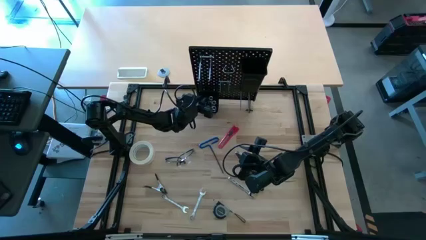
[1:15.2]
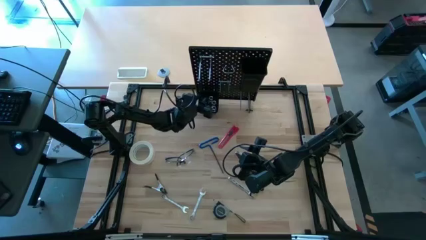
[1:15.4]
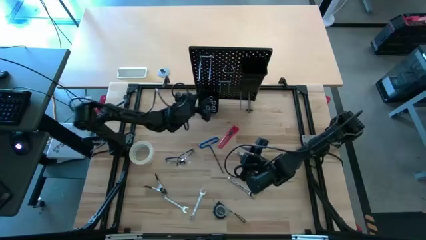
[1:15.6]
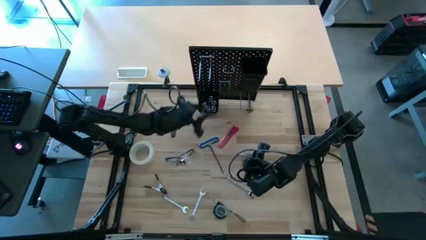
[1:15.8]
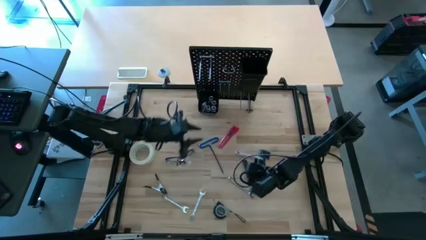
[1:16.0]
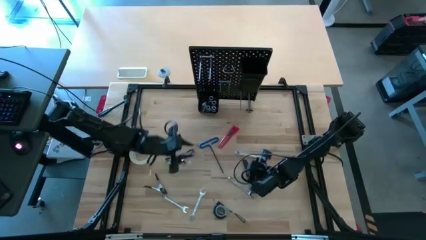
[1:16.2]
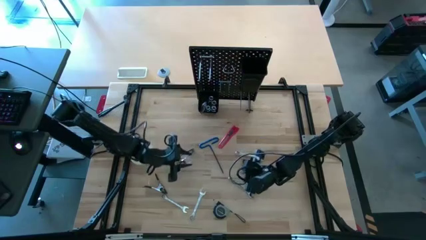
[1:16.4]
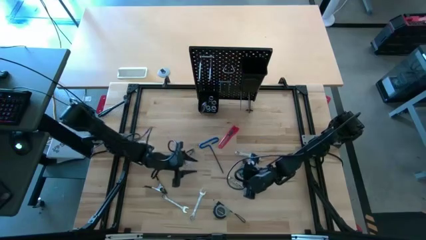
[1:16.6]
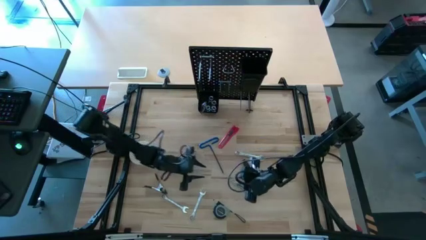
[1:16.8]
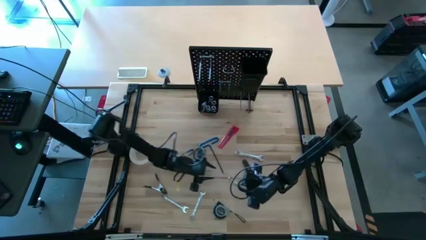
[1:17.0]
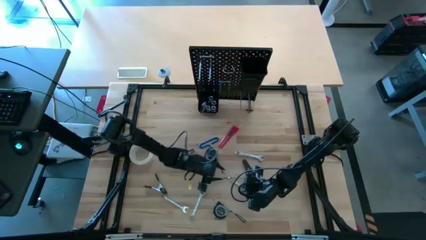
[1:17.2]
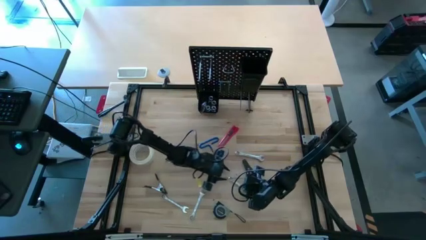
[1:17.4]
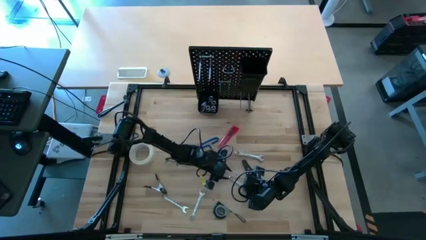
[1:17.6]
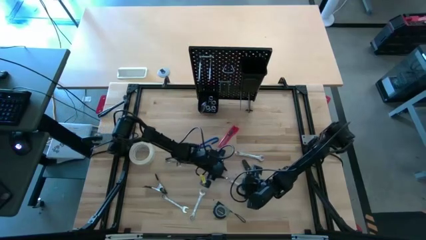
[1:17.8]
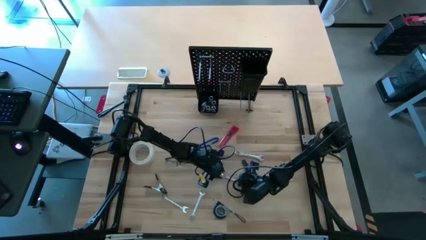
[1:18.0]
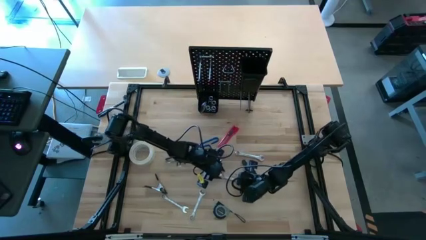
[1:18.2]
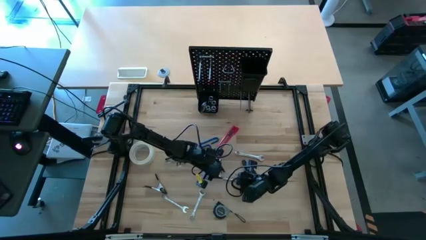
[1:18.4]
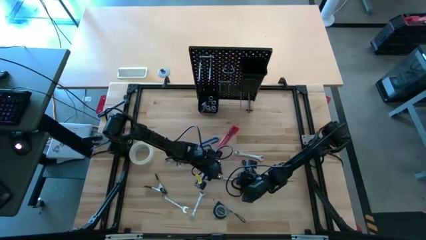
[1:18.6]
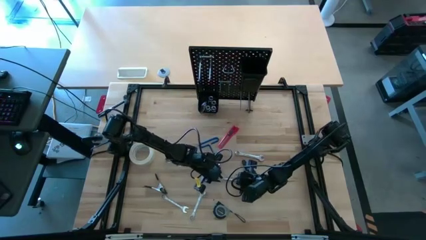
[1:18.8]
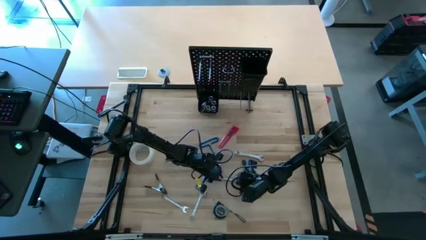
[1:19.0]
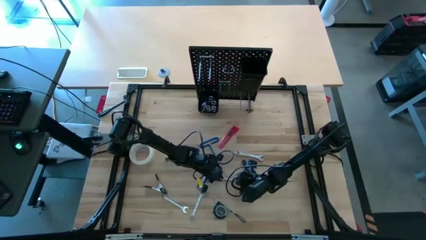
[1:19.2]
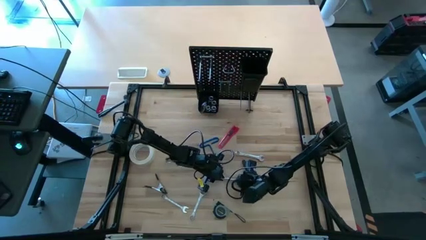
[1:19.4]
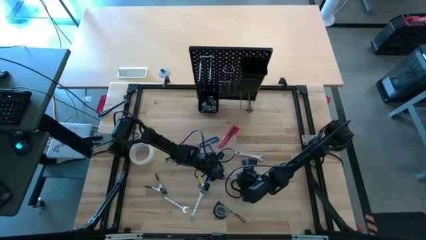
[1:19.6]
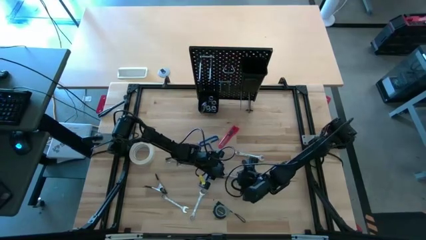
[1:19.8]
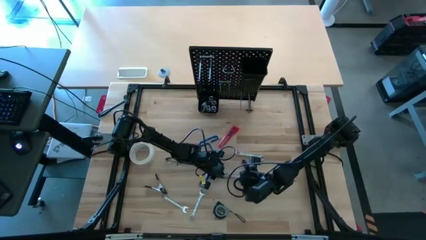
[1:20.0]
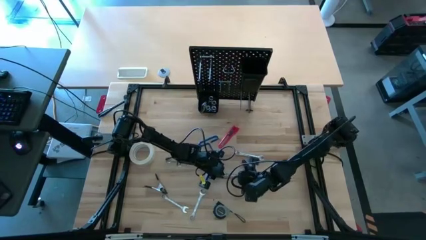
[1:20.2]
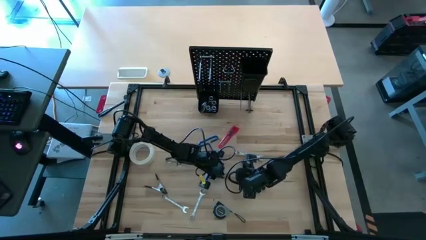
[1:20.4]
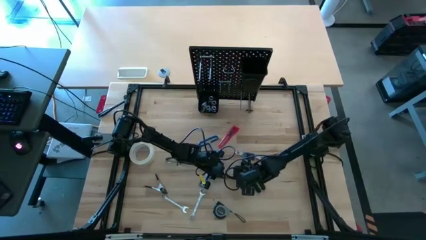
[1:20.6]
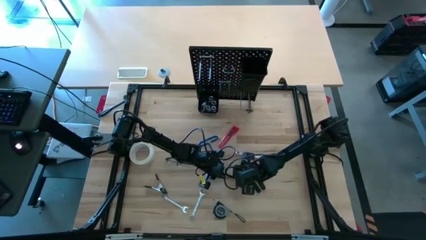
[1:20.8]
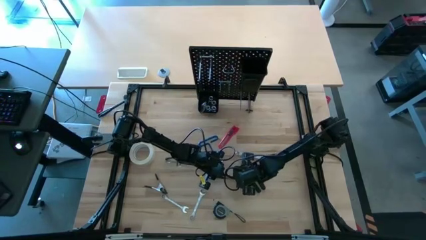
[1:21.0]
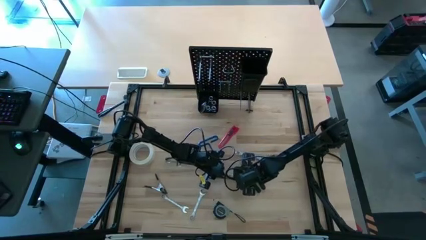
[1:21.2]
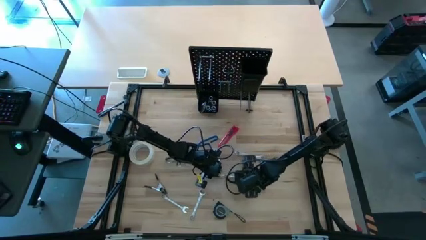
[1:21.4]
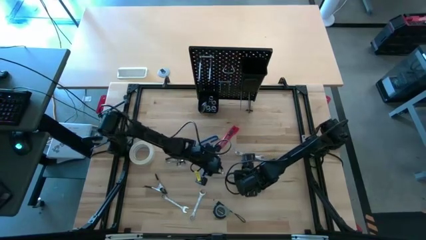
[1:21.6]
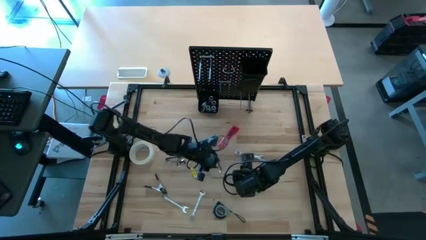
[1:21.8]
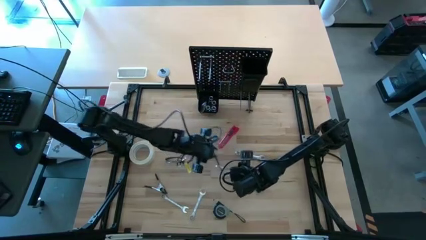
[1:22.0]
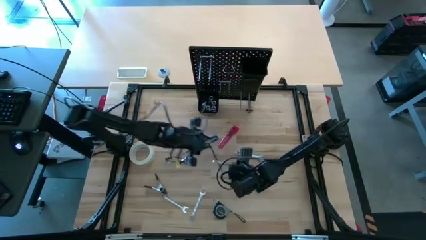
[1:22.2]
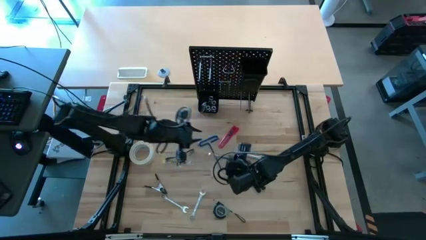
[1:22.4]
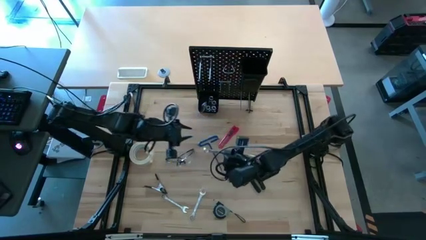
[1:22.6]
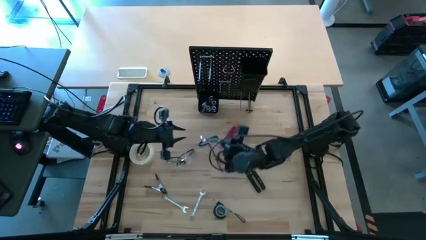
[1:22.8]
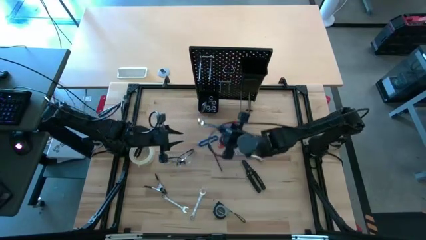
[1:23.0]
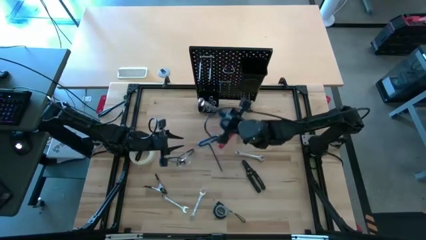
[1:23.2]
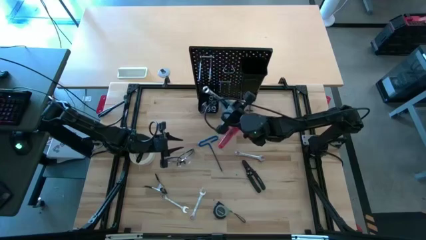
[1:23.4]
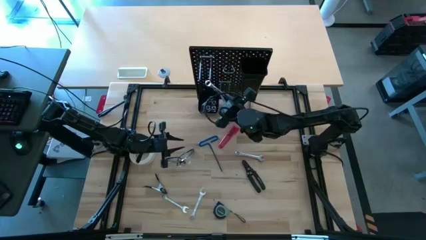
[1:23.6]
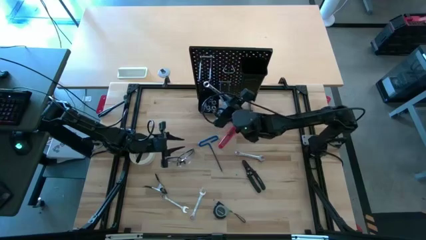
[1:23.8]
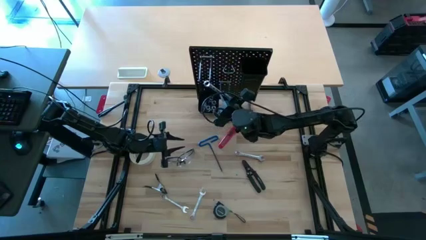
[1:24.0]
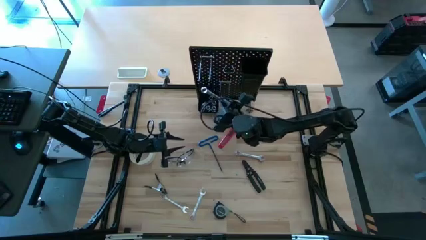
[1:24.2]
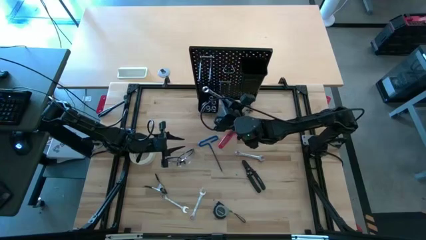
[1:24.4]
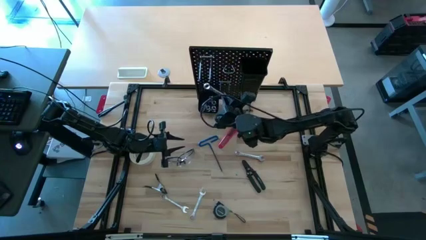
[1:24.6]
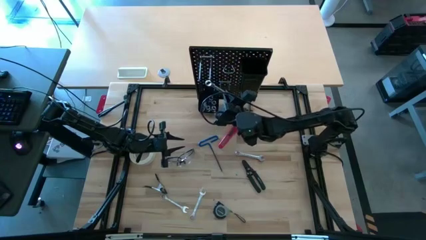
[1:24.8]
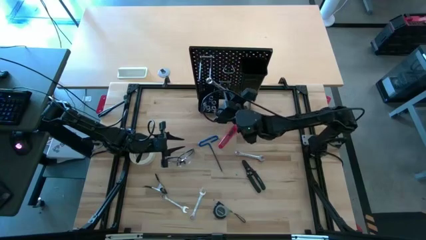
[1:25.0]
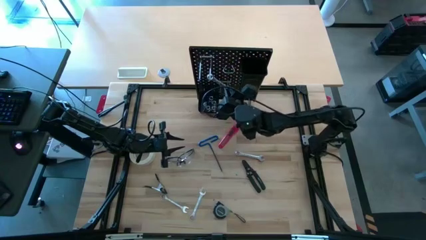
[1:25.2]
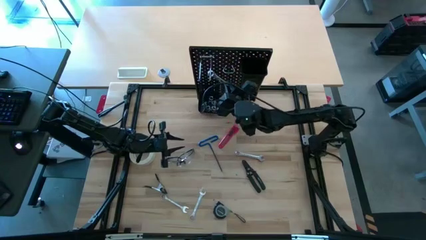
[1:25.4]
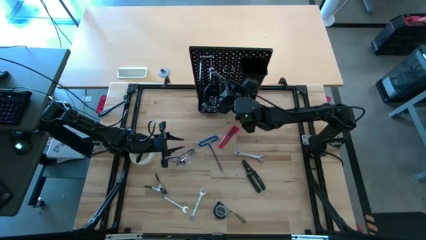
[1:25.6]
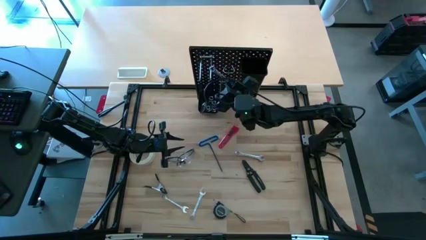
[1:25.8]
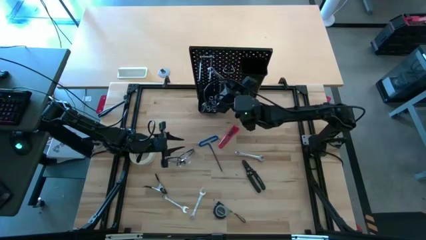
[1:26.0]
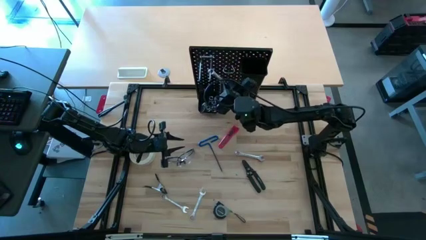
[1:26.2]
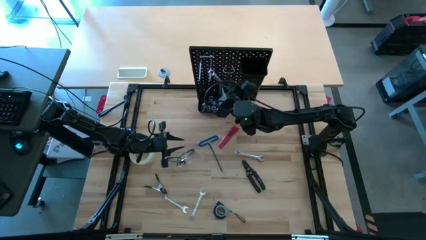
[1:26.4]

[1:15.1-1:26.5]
Task: Hang tools onto peg board
Hang the middle right wrench onto the peg board

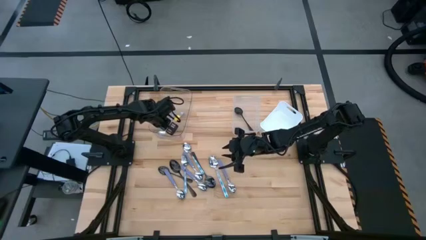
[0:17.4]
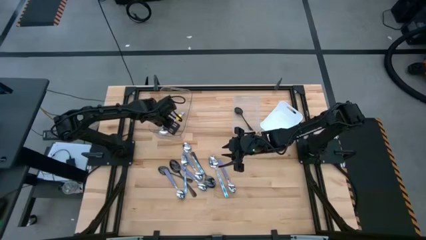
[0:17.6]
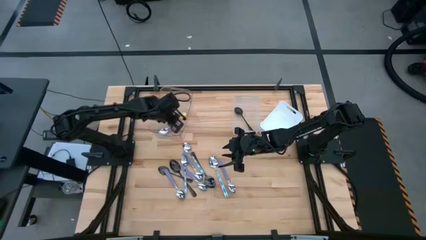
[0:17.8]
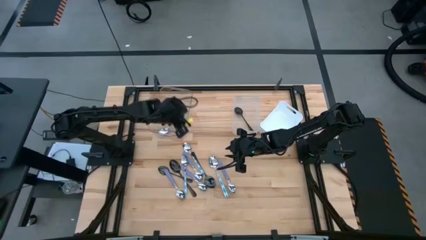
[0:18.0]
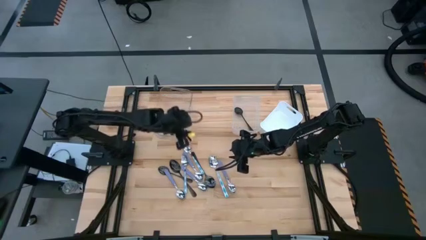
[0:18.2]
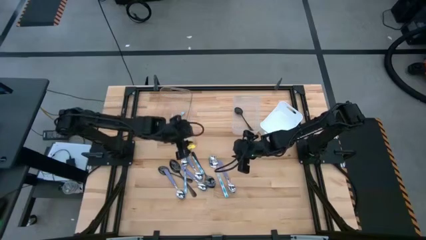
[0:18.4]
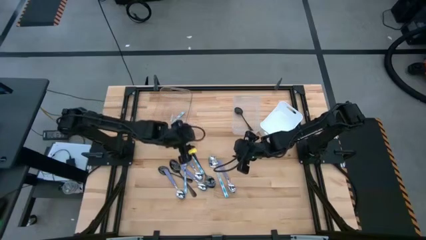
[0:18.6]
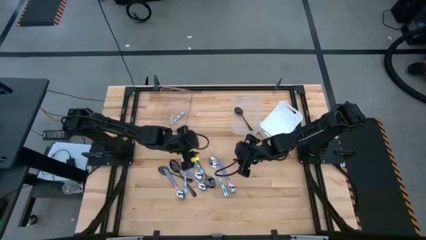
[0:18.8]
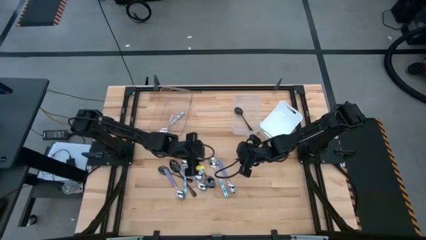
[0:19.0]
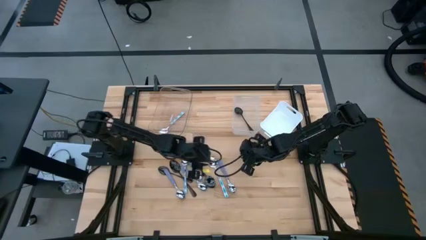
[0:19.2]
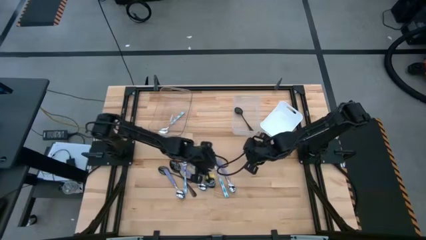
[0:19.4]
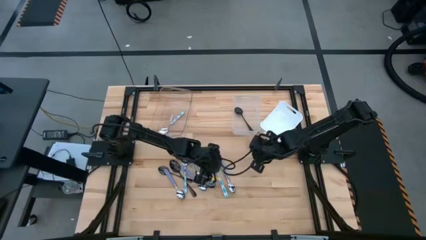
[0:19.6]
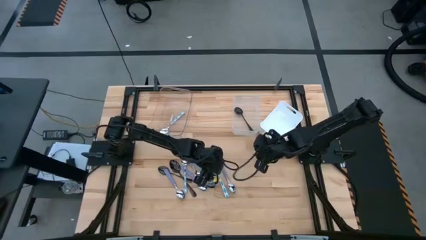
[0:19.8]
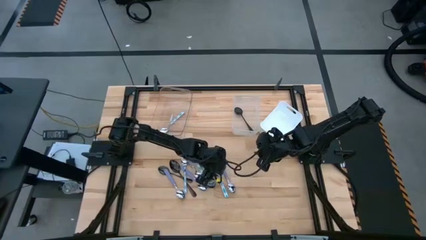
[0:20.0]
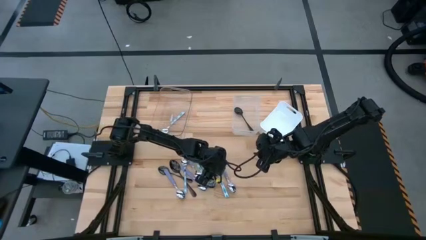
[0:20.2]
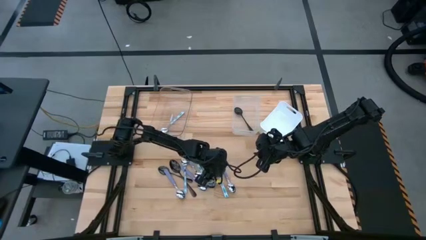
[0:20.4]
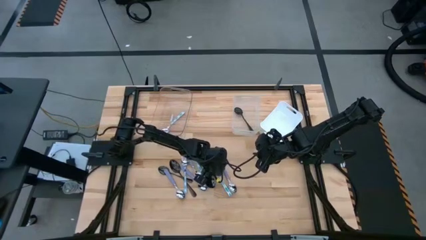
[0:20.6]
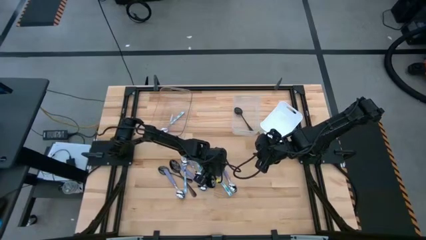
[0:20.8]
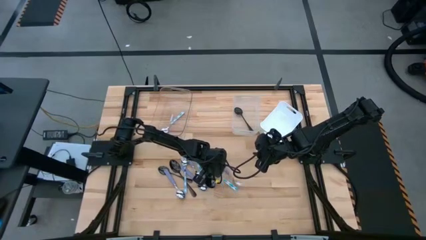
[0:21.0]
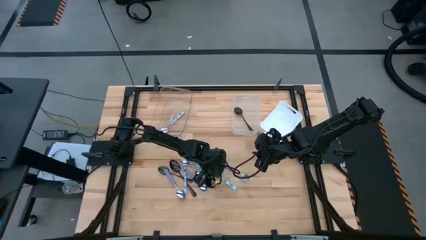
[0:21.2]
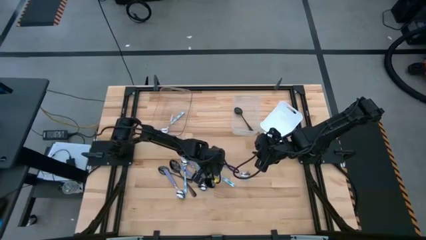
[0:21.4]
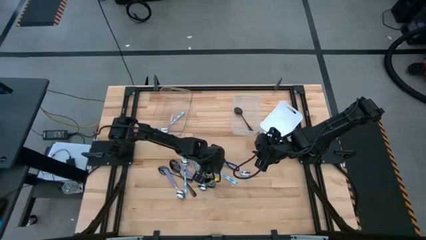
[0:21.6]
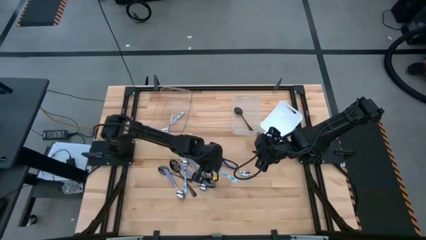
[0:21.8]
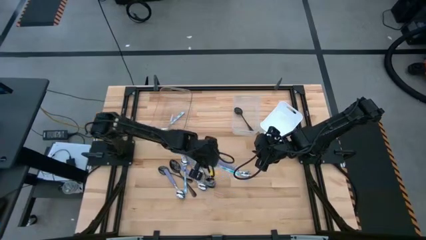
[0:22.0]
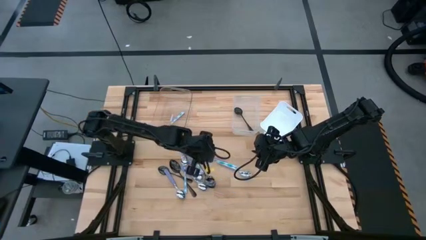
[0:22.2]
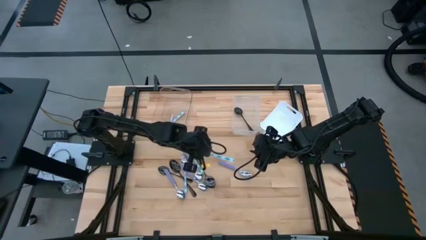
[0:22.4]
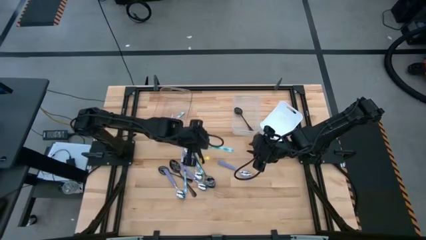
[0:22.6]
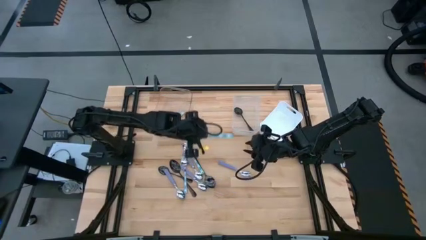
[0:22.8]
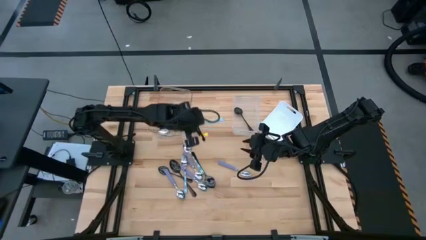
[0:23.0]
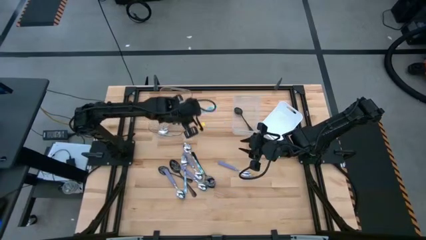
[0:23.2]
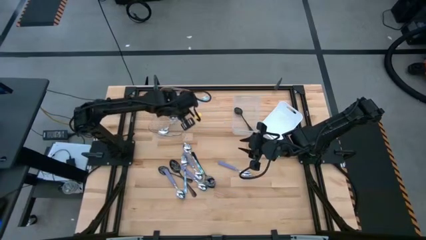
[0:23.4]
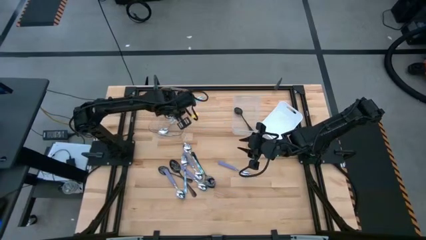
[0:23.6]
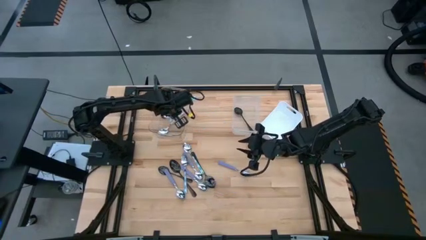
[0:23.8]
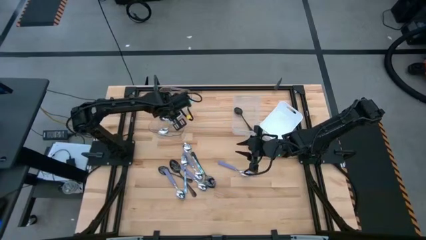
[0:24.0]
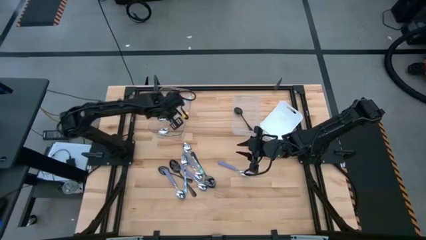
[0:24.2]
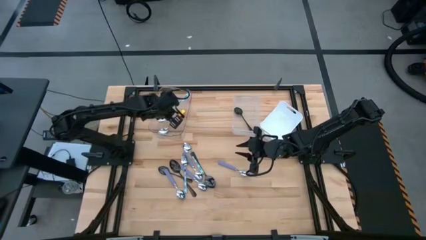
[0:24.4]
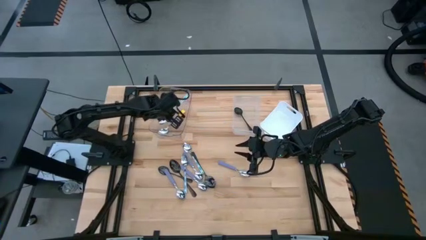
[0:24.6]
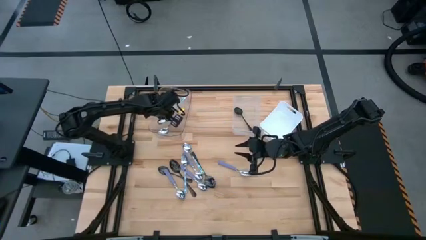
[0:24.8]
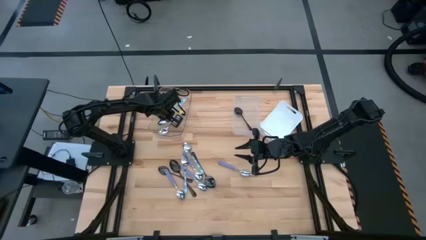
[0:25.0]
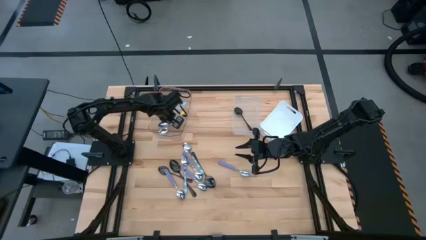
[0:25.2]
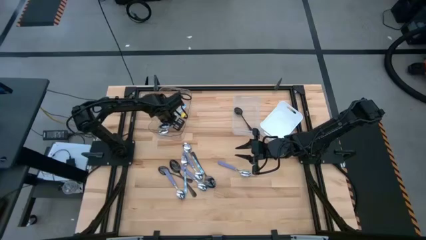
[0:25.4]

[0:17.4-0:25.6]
Task: Sort silverware by color (type)
Put the green pattern spoon into the transparent bin
